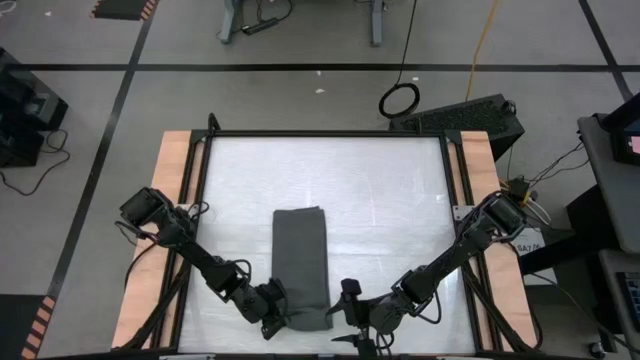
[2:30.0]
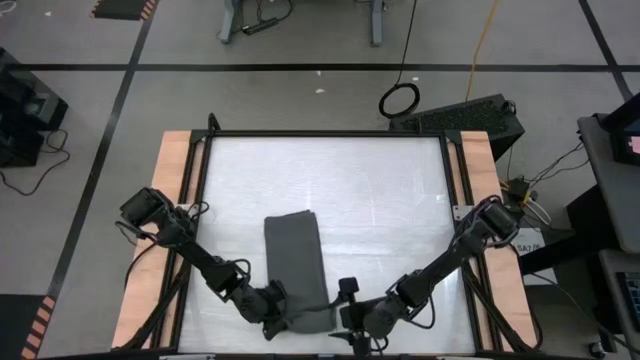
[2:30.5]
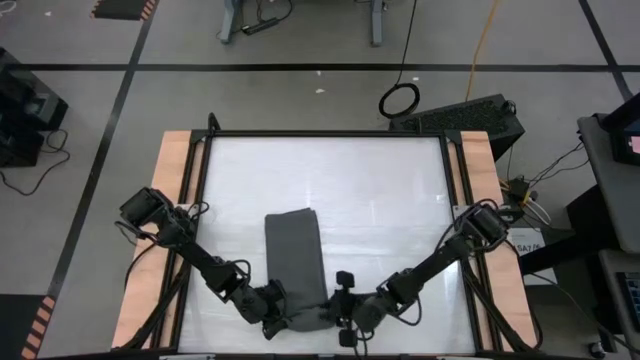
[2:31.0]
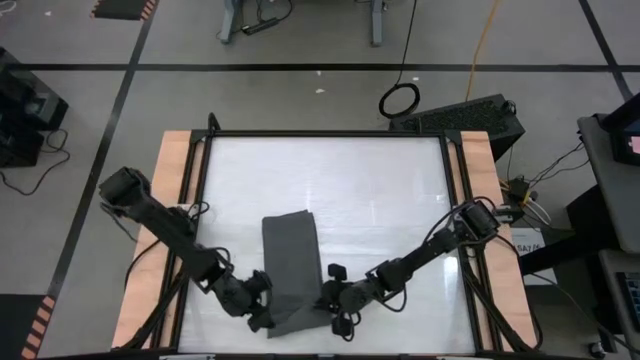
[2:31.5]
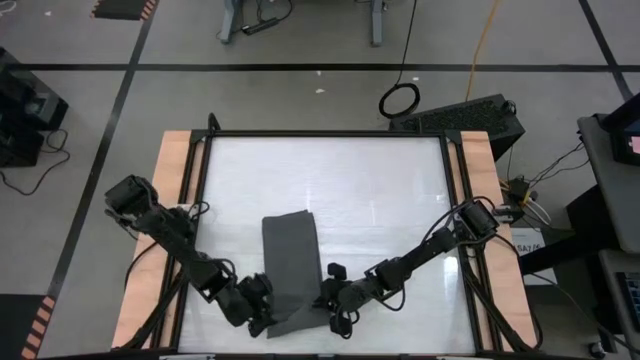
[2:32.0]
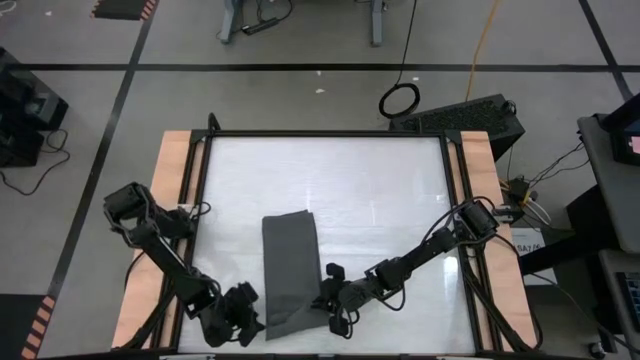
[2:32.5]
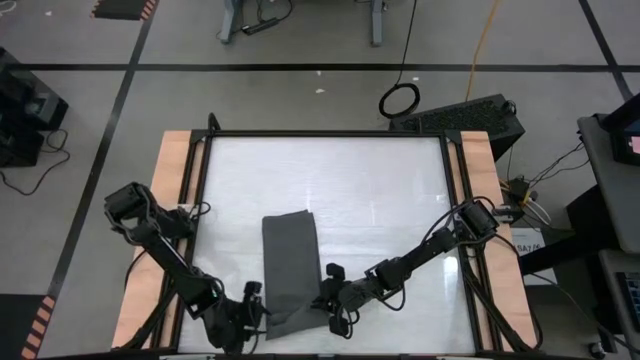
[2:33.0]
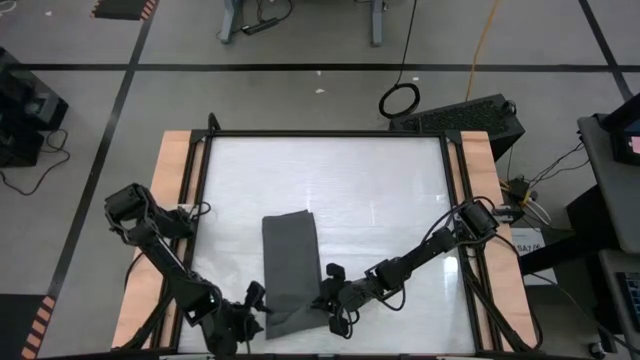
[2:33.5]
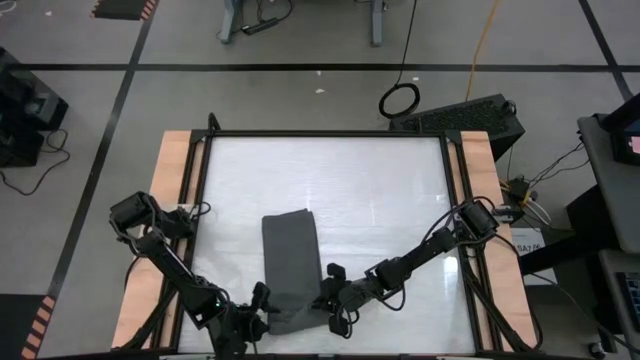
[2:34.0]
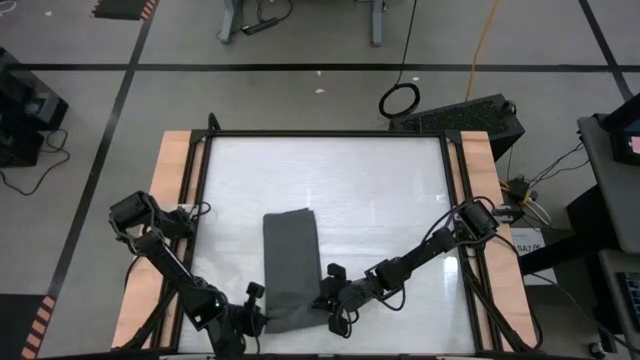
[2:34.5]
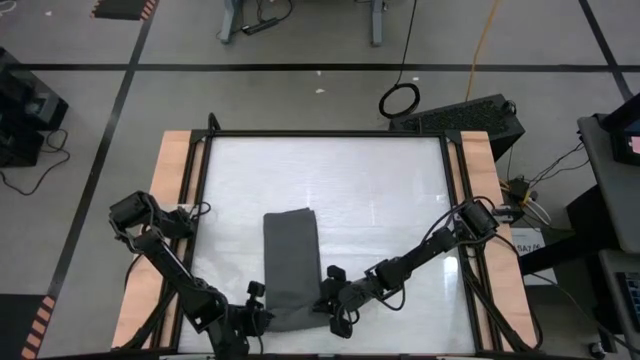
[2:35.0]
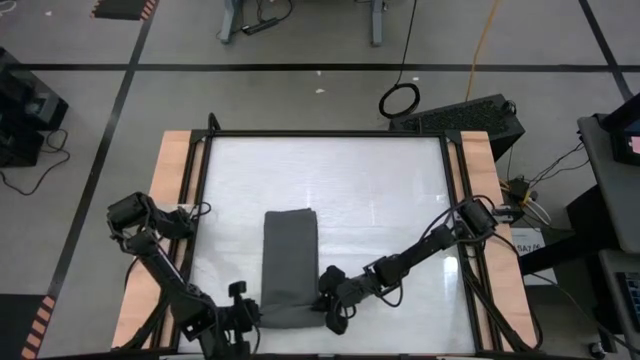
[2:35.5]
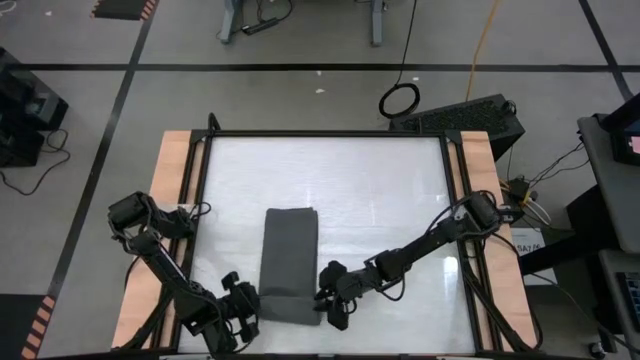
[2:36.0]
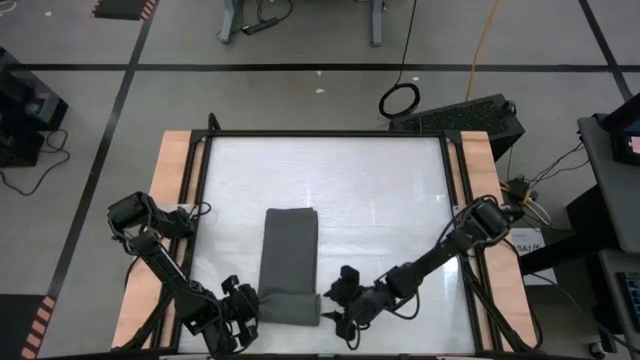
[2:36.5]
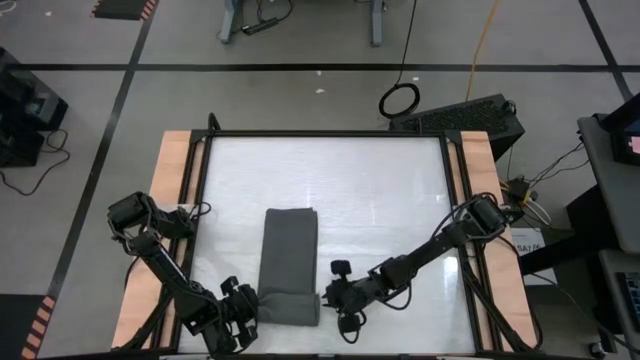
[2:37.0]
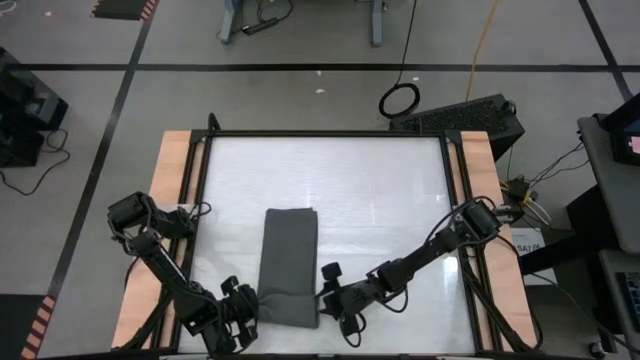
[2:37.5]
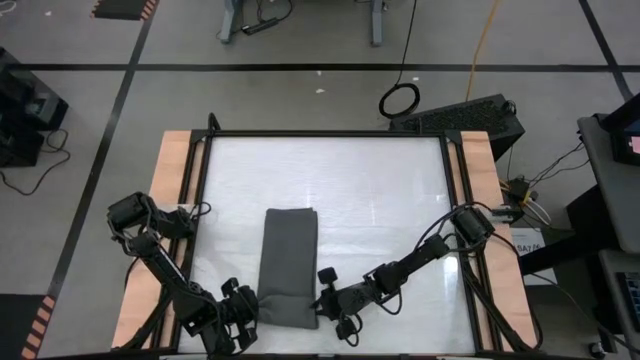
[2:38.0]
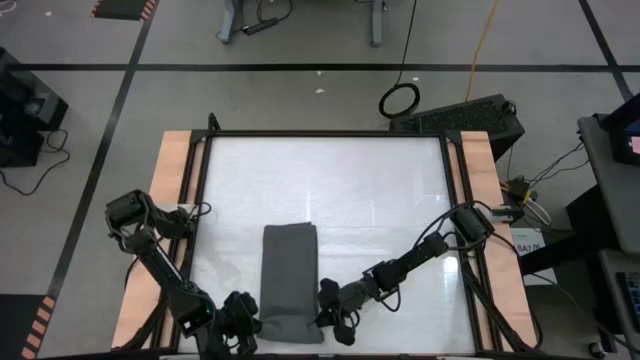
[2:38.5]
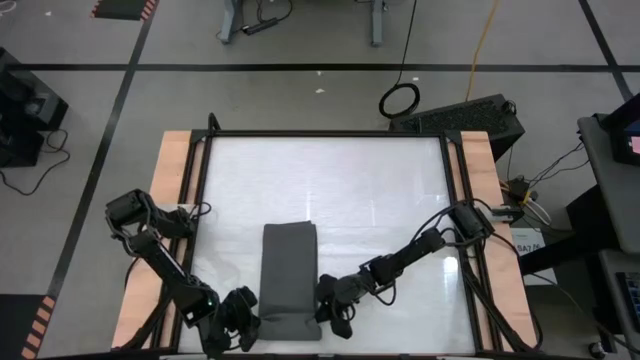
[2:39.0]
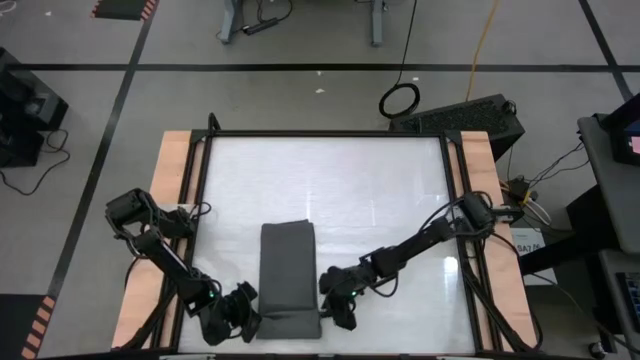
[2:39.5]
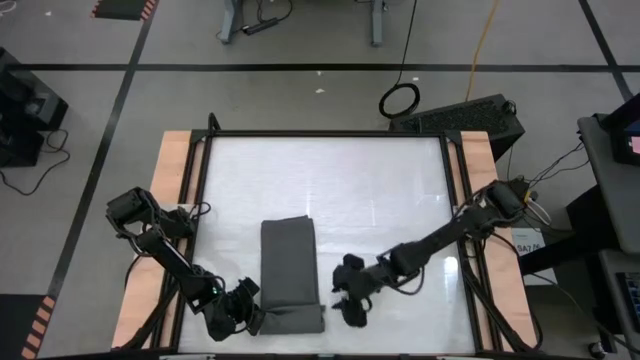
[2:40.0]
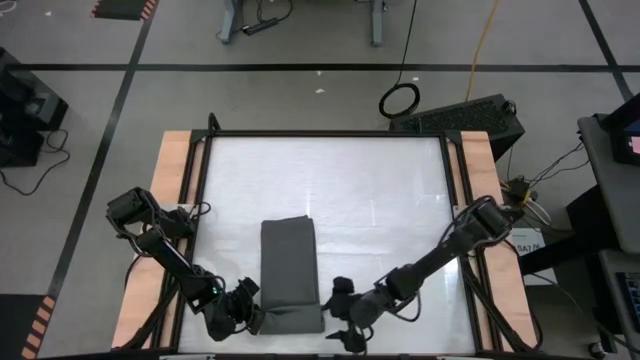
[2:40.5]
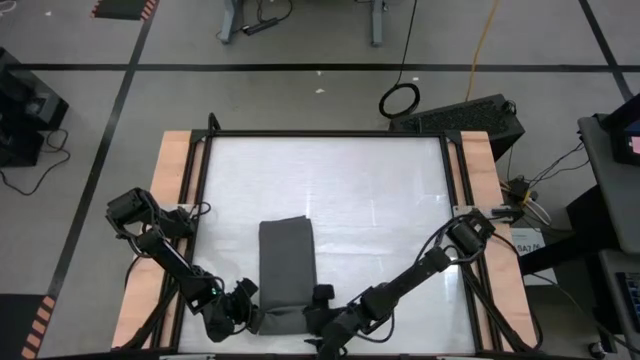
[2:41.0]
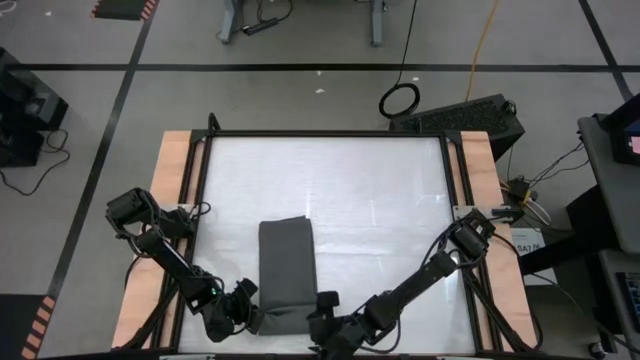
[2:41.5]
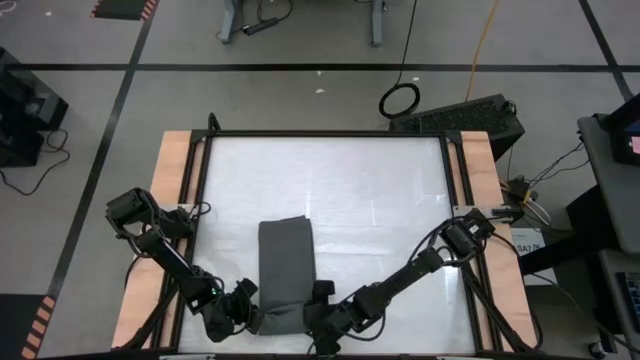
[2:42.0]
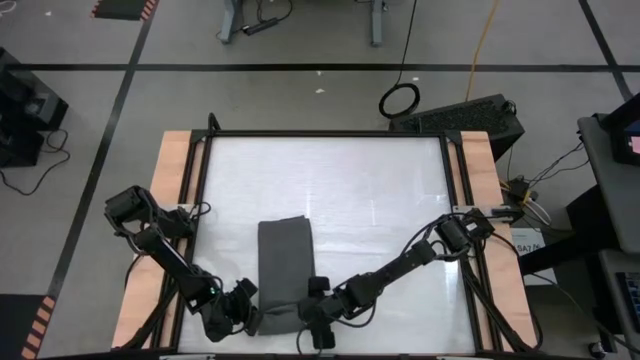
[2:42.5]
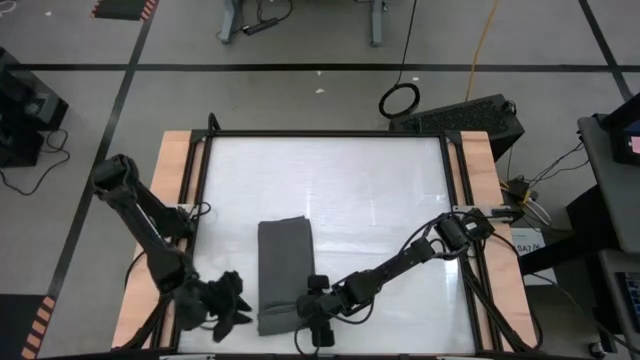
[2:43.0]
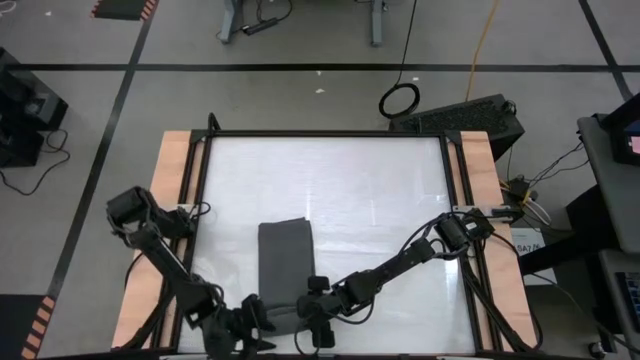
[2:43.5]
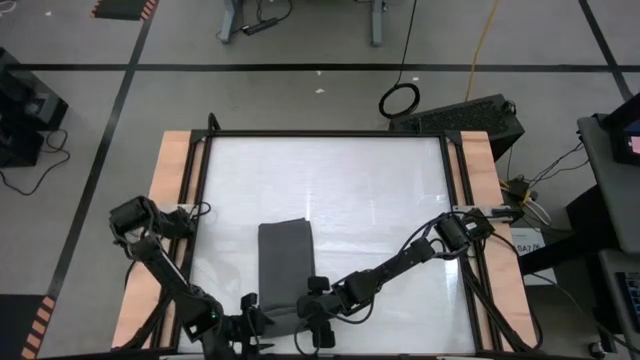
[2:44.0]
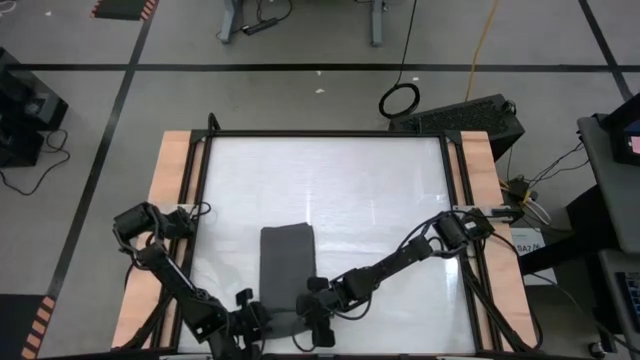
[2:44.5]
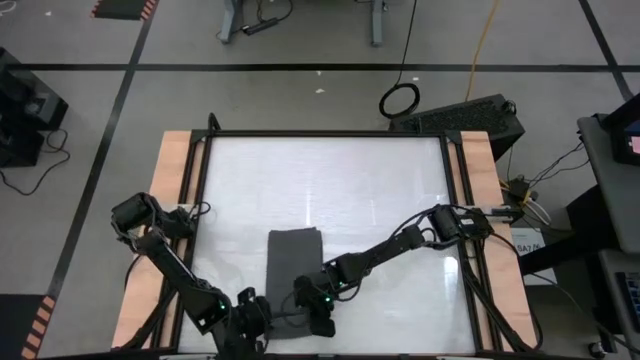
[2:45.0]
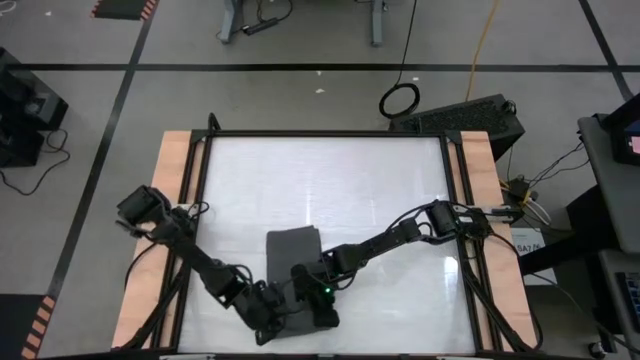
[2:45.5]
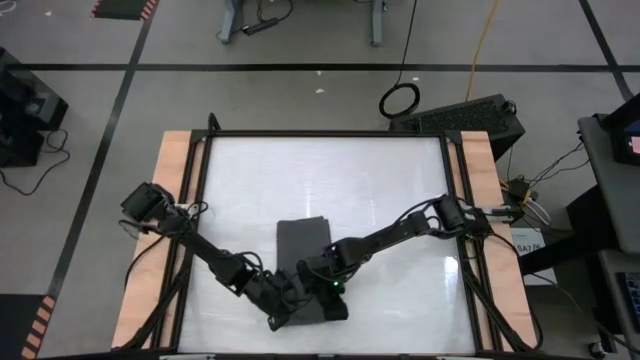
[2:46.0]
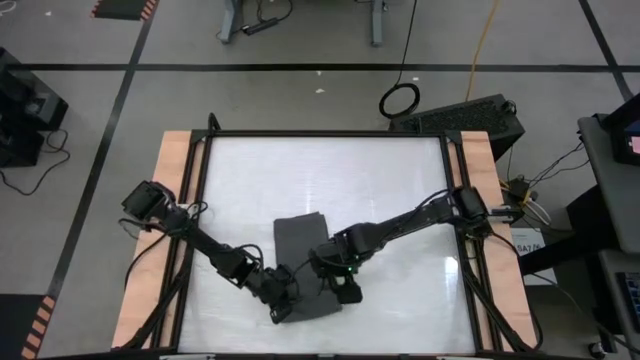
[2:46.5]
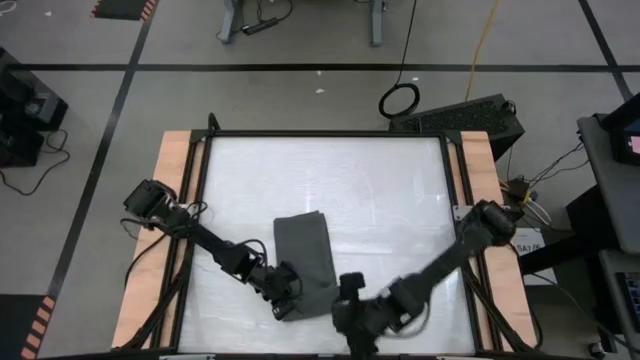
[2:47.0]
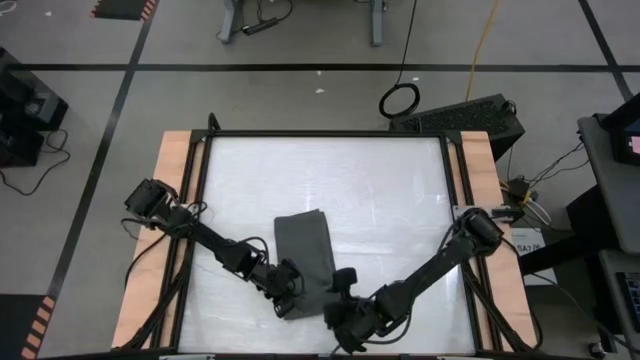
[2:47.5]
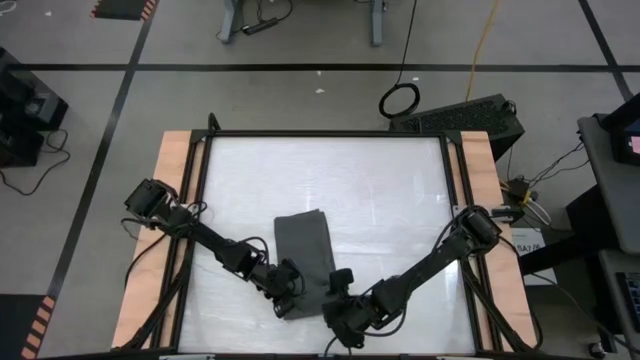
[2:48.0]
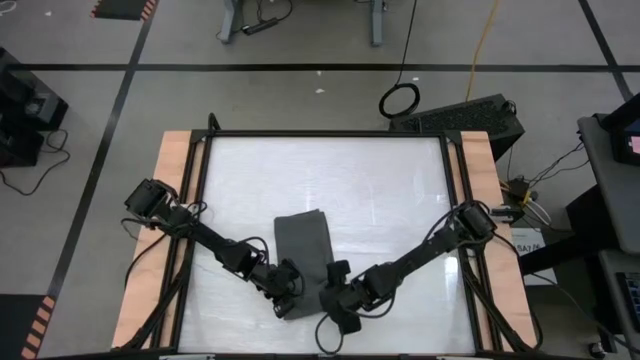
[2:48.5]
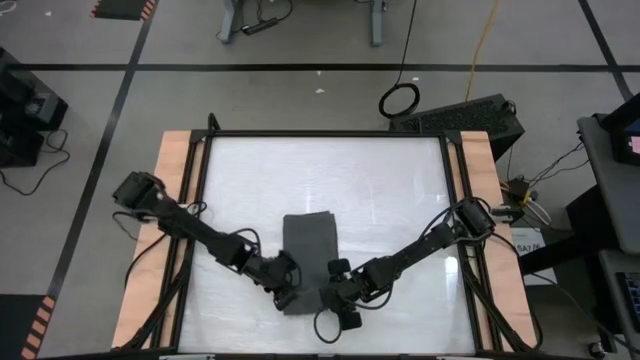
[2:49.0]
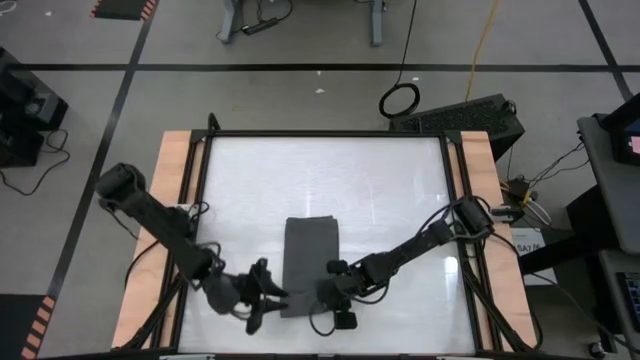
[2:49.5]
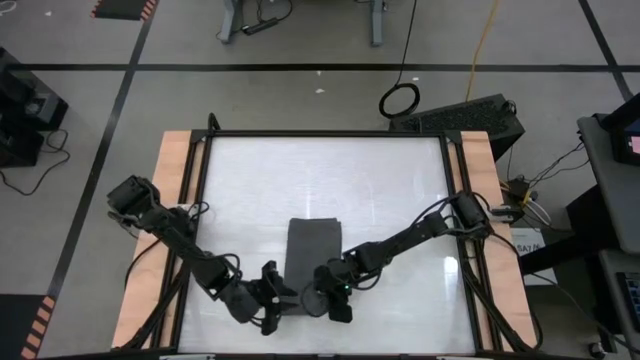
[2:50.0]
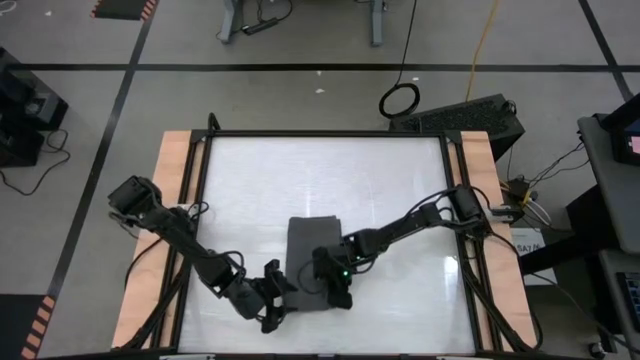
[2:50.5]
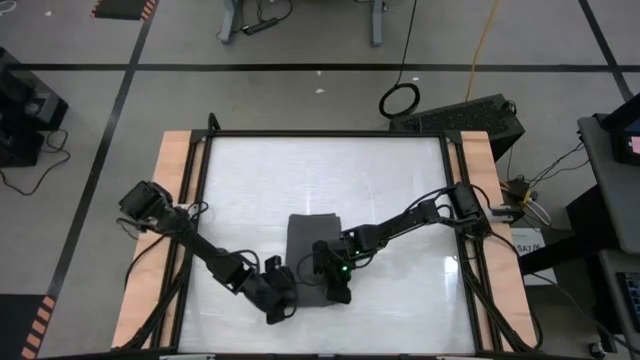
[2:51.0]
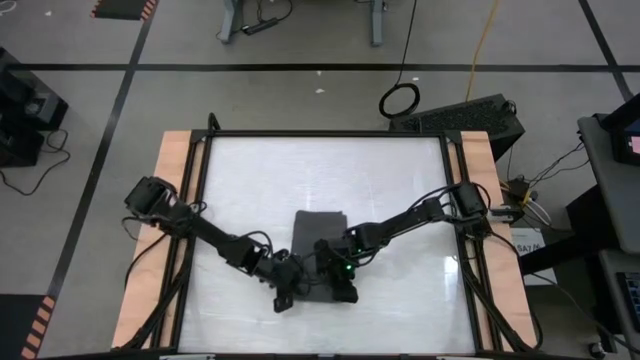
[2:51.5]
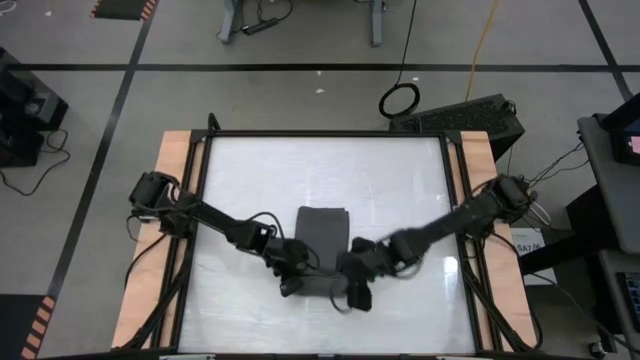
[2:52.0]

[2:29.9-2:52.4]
Task: Roll towel into tight, uniform cylinder
Roll the gray towel
